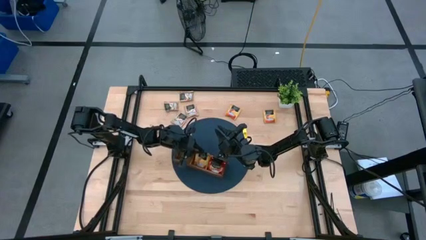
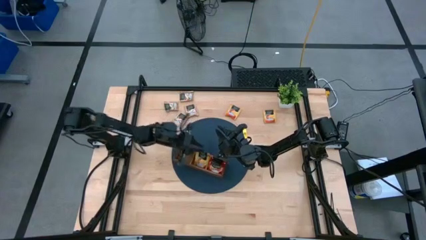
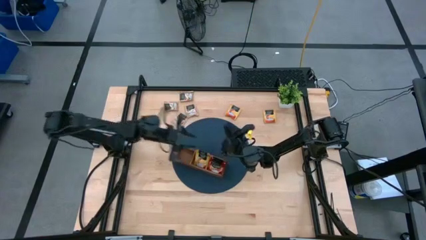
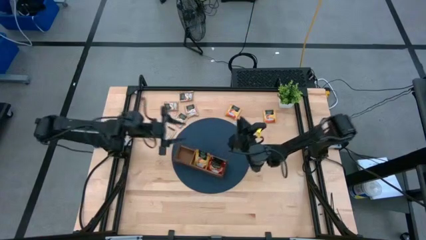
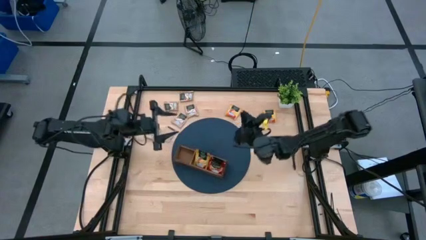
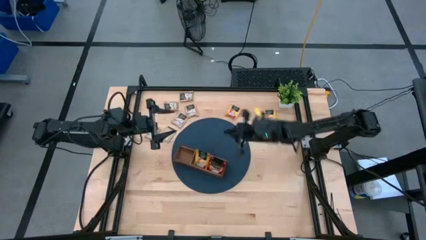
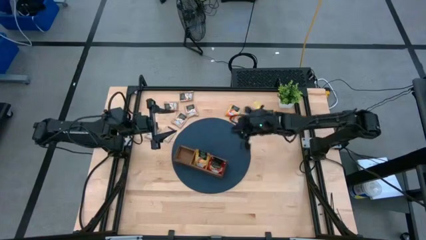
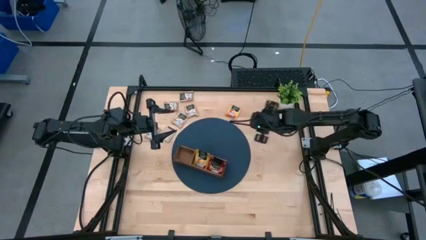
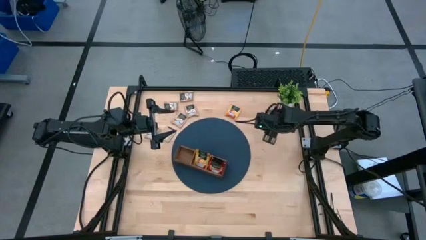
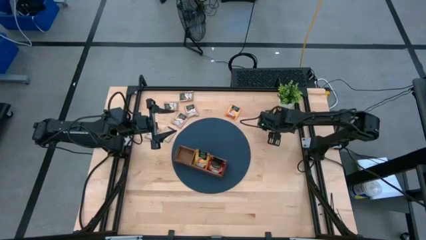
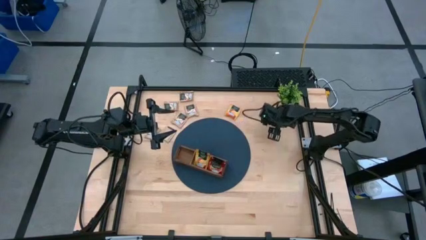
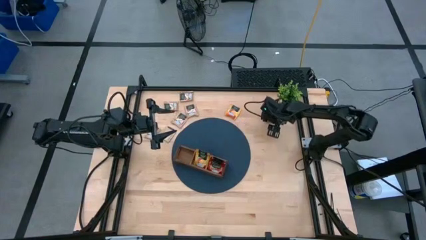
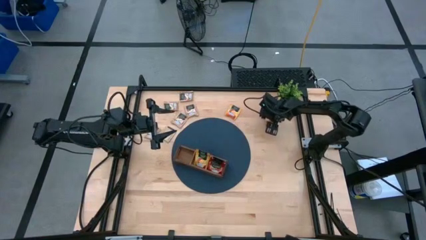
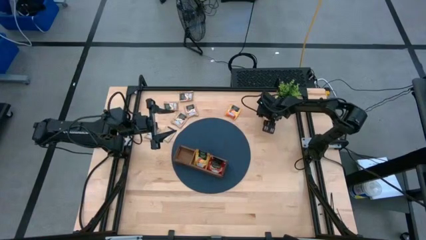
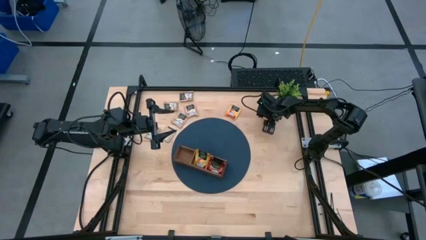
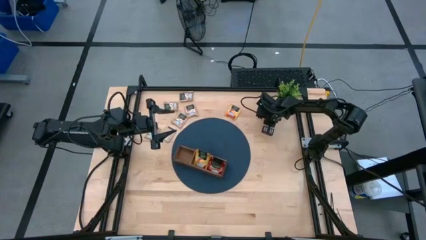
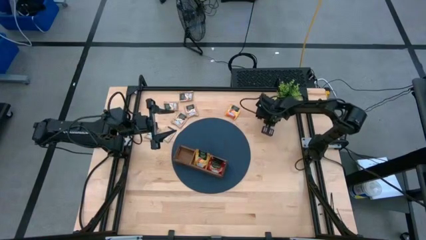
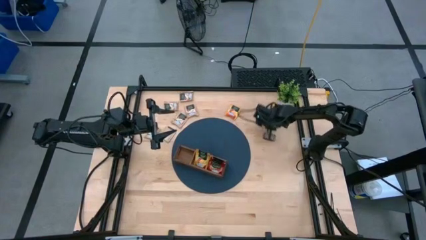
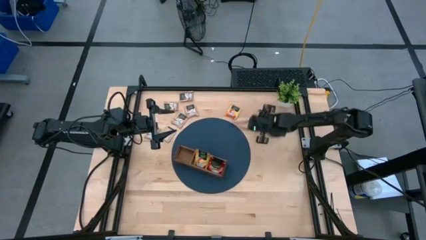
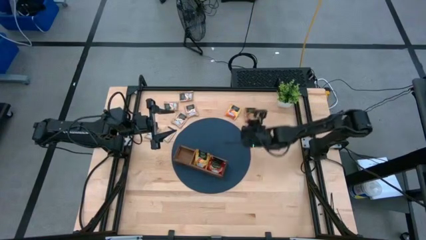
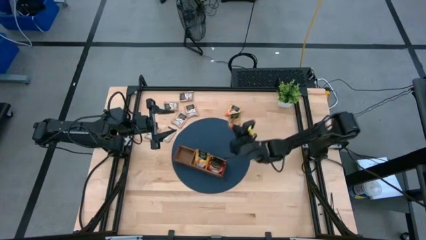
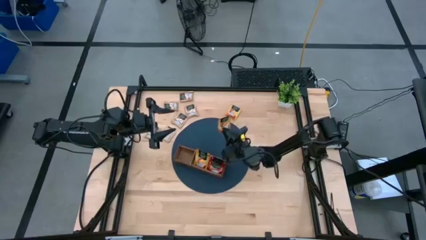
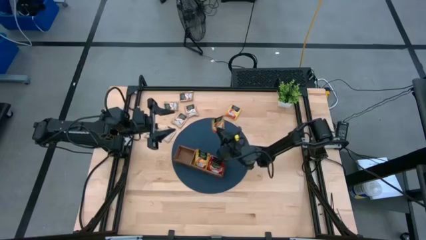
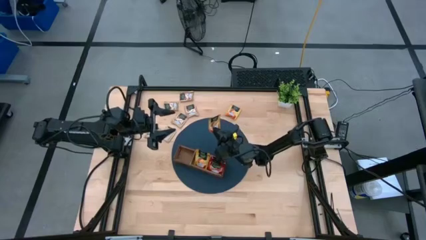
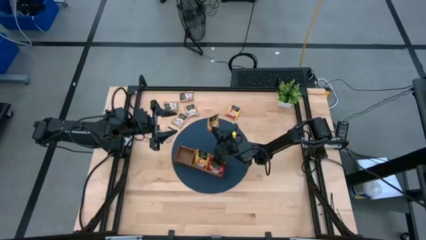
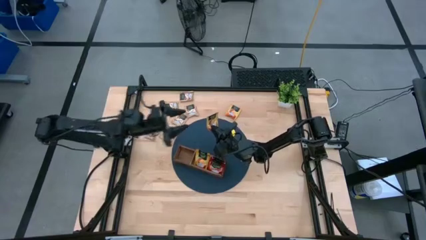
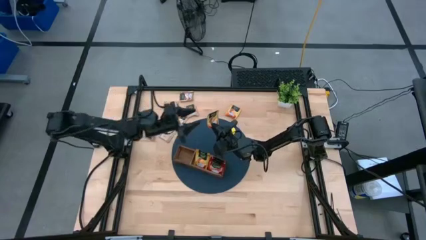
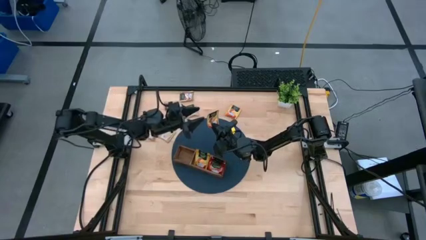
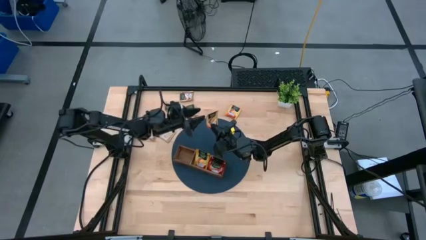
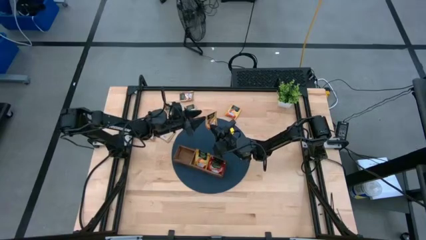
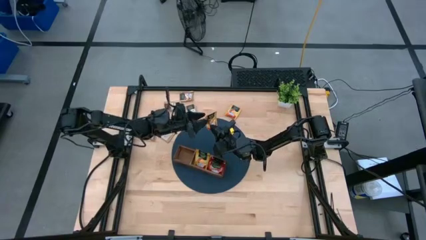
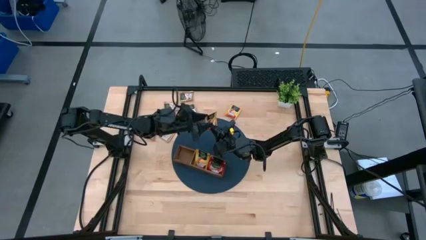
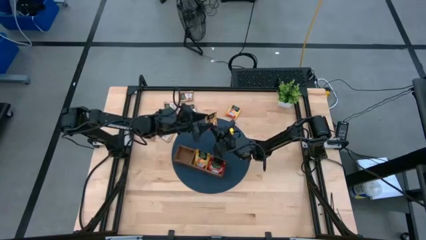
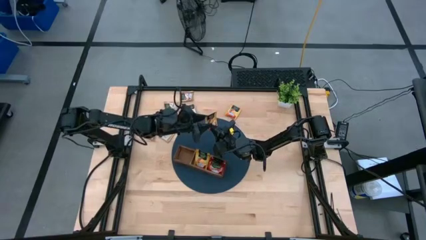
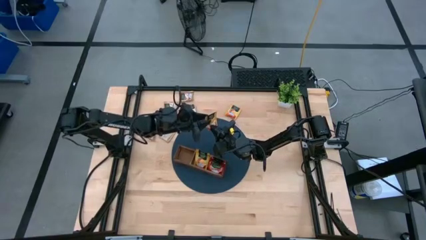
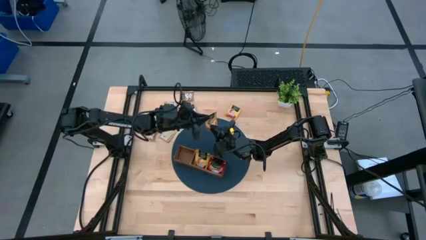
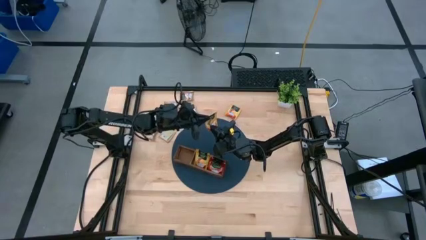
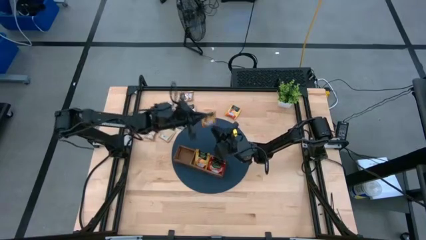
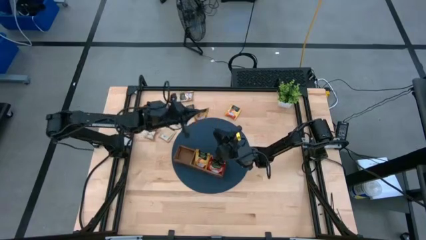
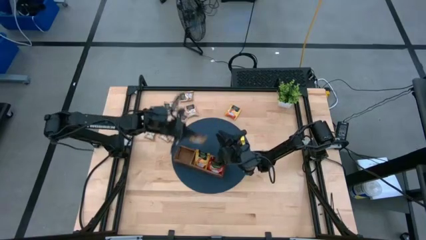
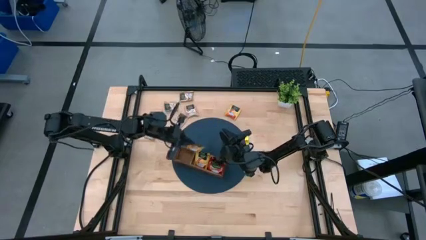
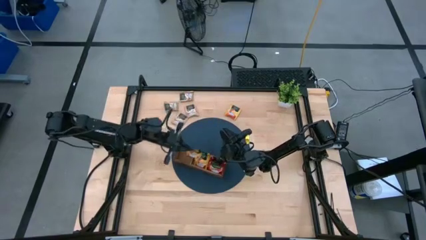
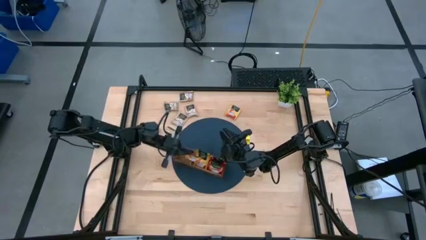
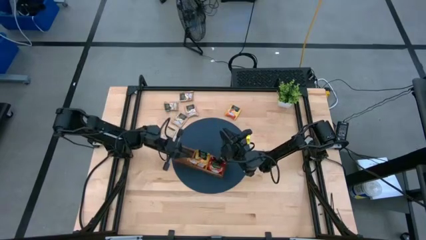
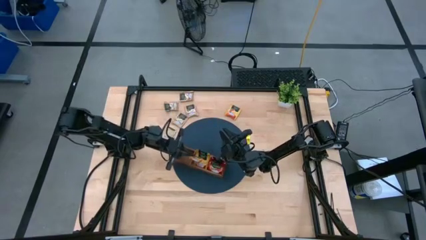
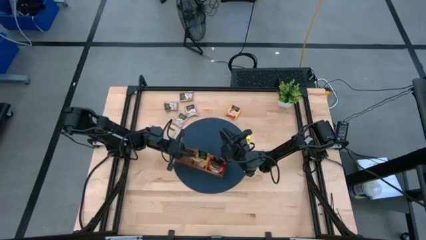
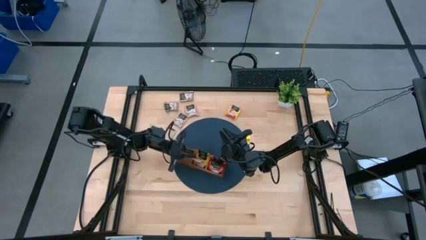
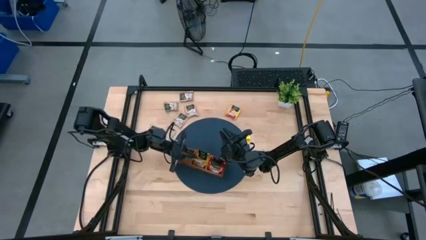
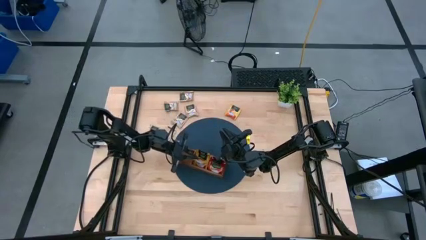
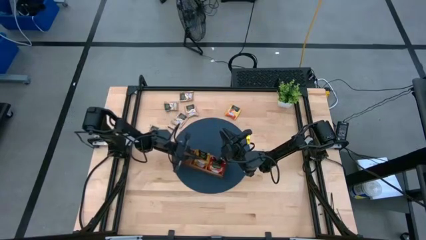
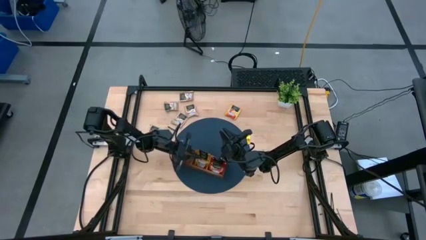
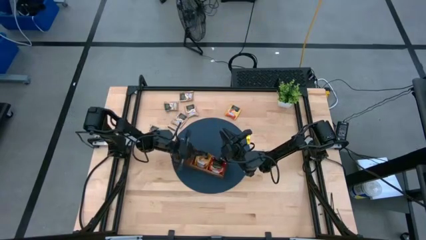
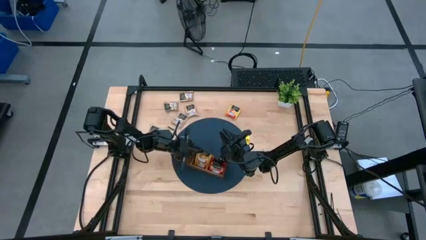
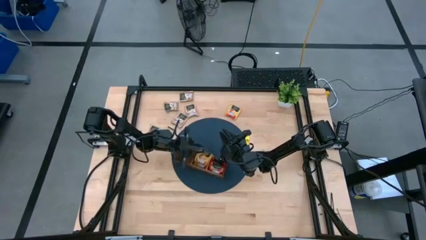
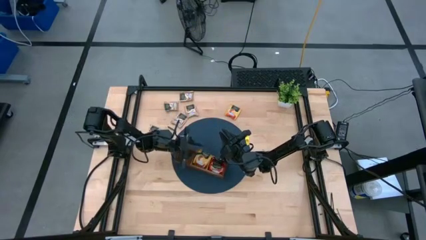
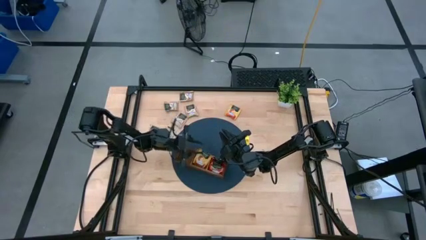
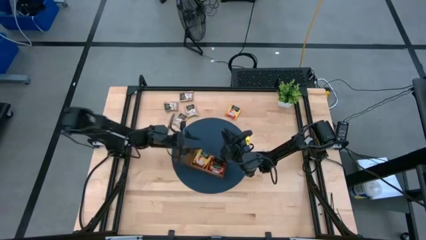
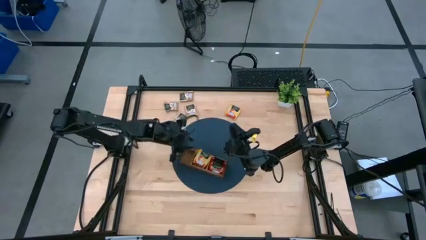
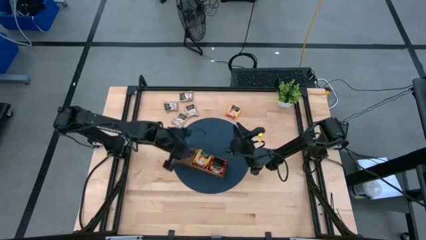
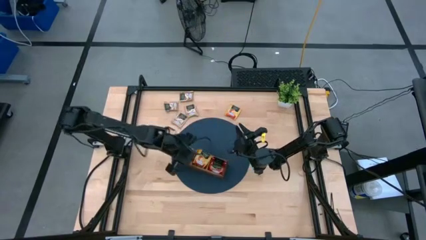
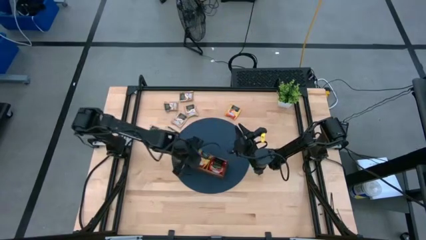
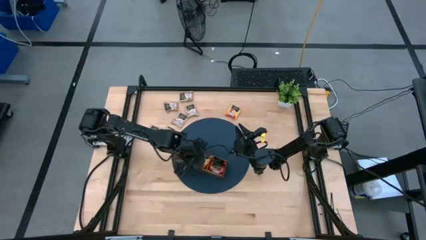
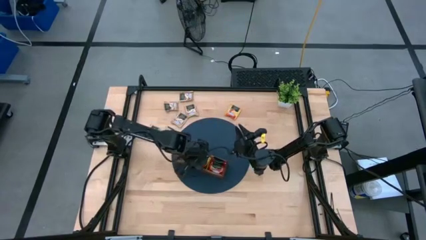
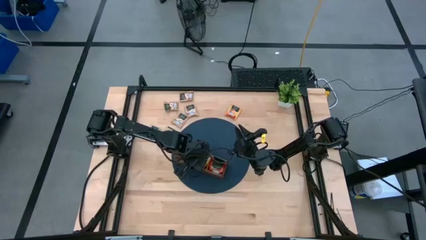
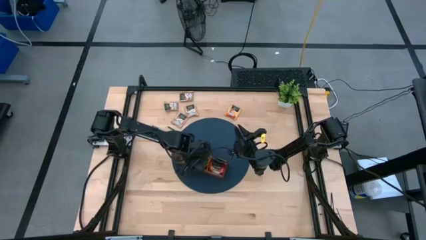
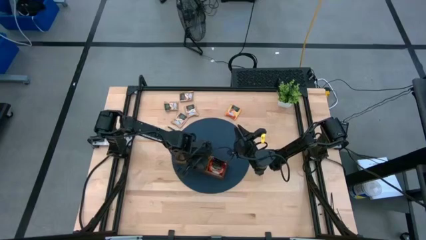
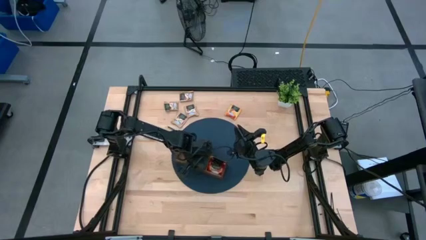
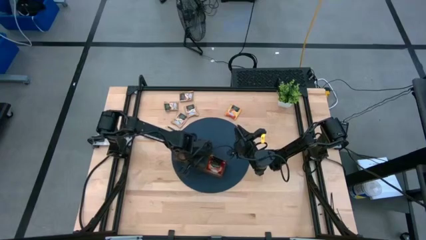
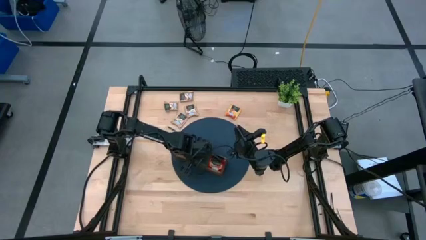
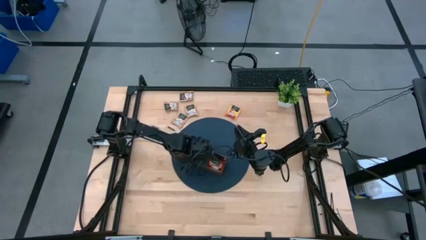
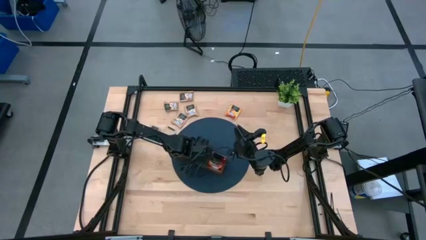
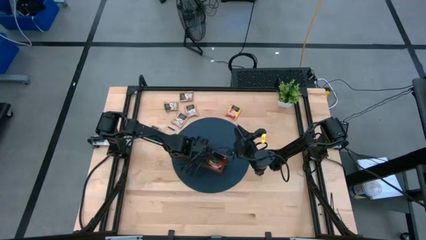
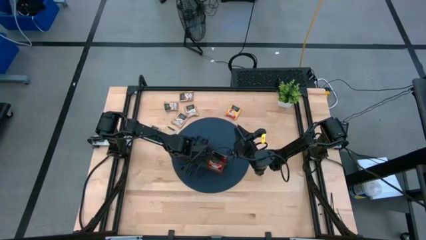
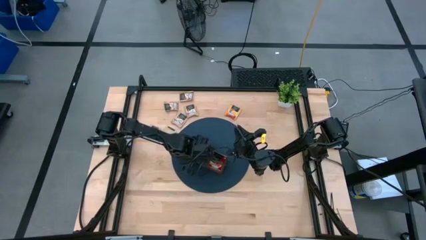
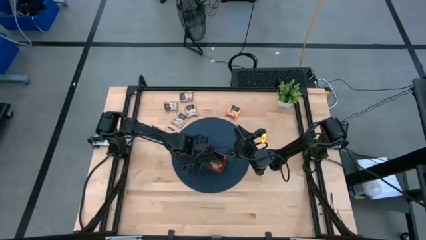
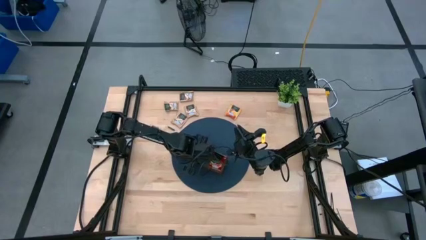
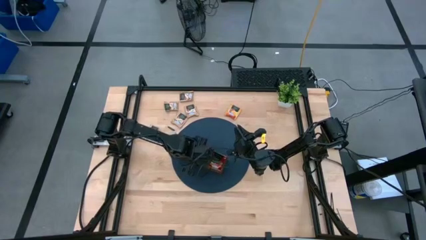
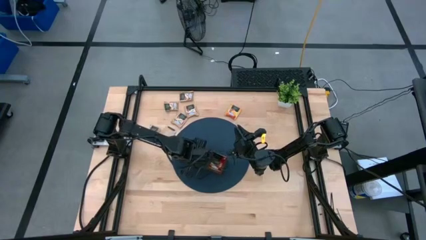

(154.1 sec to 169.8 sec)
Task: Pick & Place Tea
Put the yellow tea bag into the middle section of the wooden organizer
